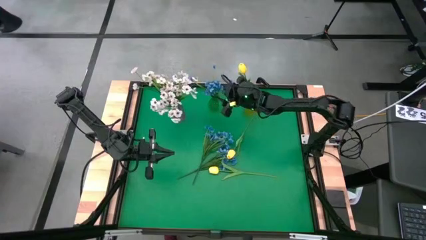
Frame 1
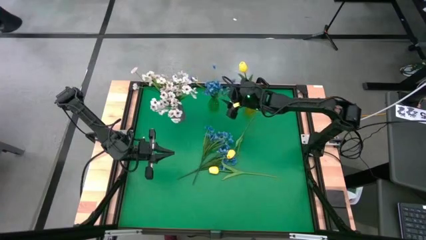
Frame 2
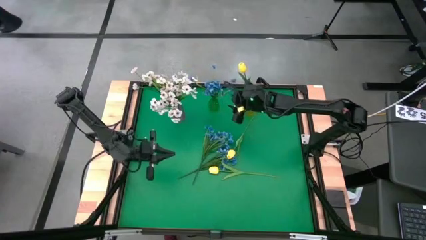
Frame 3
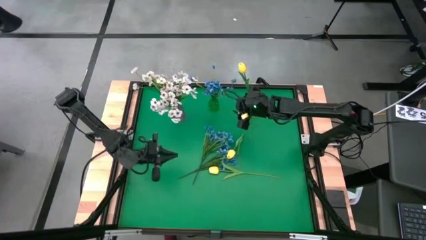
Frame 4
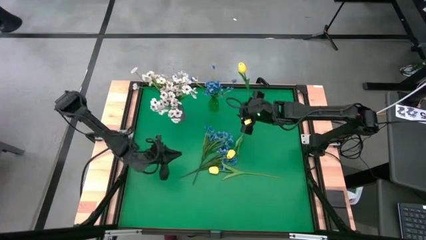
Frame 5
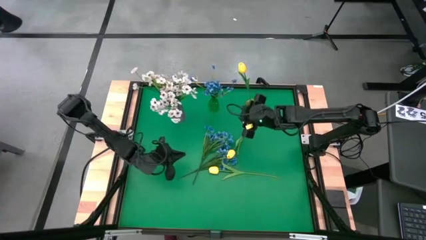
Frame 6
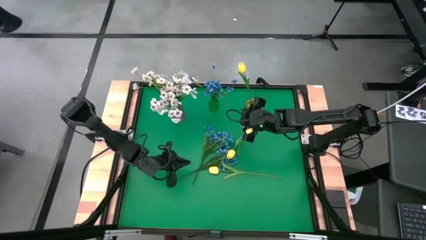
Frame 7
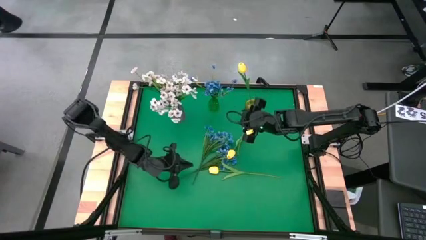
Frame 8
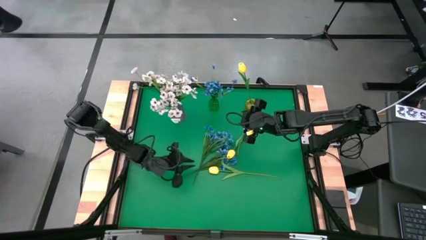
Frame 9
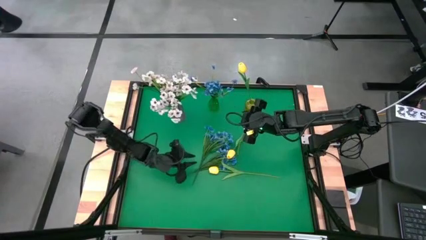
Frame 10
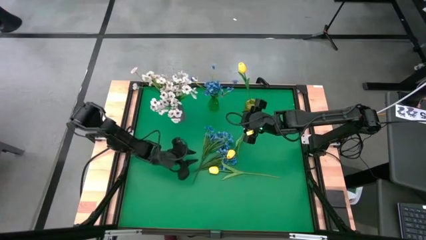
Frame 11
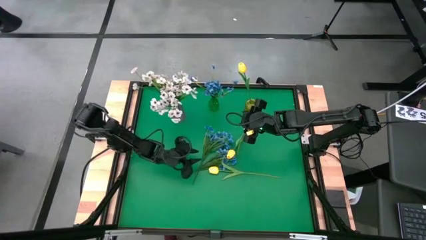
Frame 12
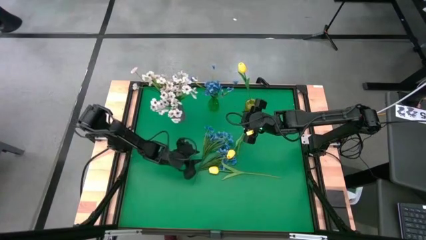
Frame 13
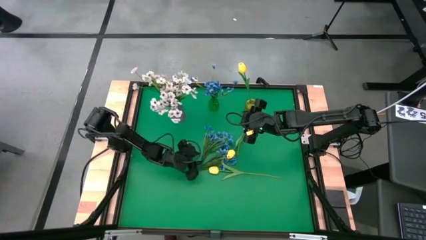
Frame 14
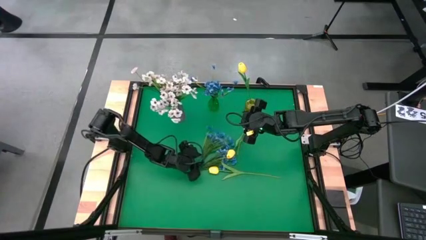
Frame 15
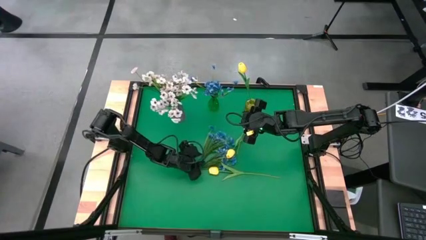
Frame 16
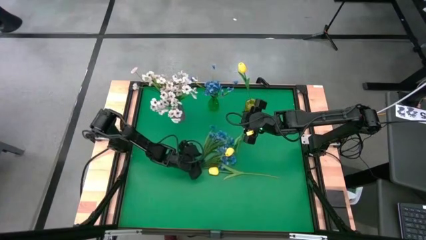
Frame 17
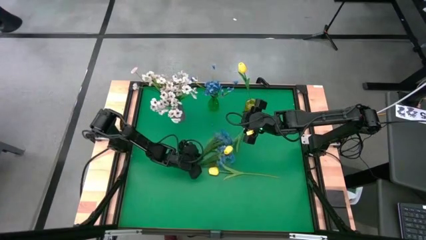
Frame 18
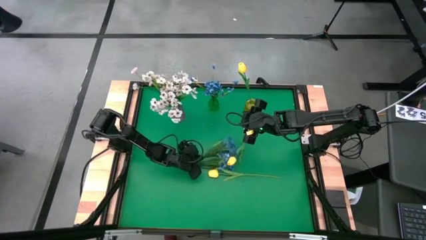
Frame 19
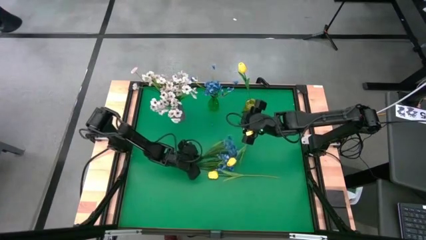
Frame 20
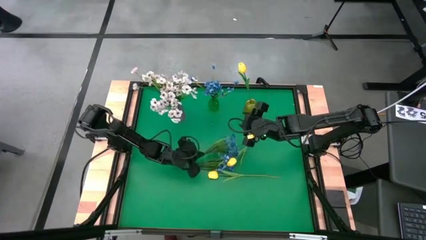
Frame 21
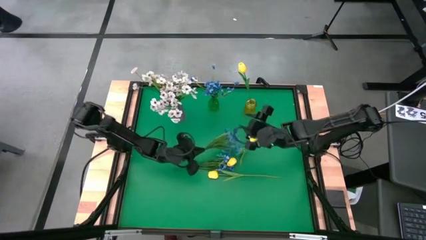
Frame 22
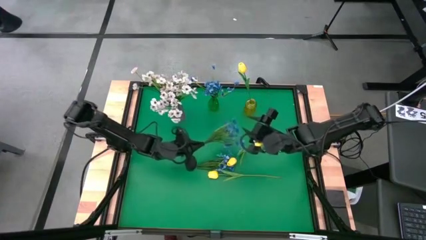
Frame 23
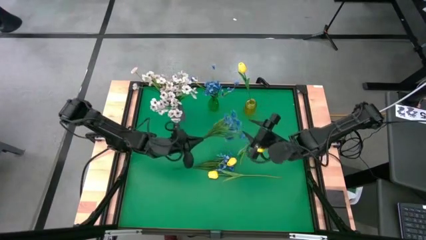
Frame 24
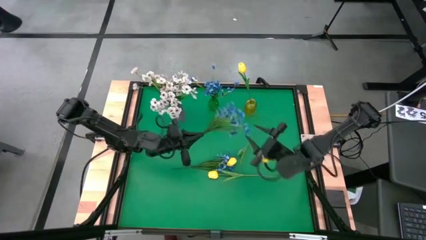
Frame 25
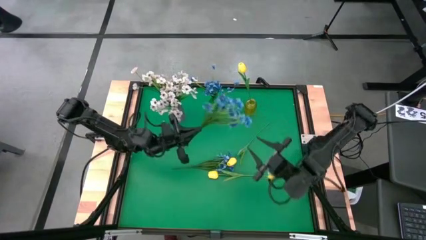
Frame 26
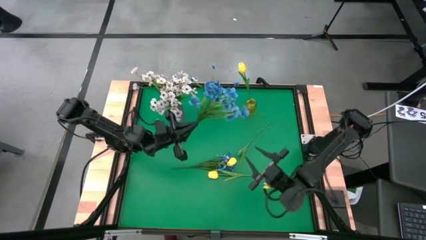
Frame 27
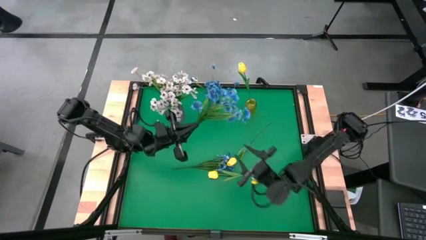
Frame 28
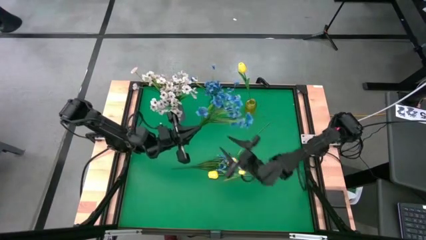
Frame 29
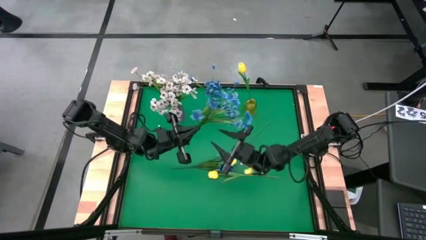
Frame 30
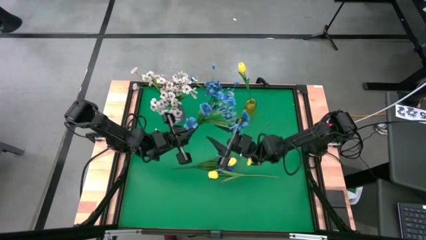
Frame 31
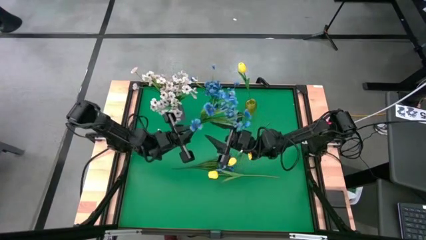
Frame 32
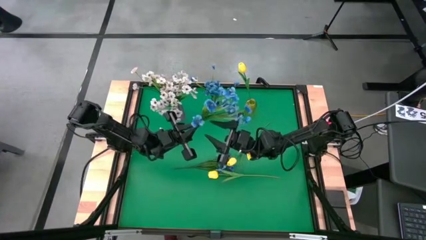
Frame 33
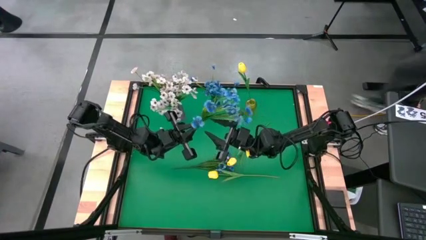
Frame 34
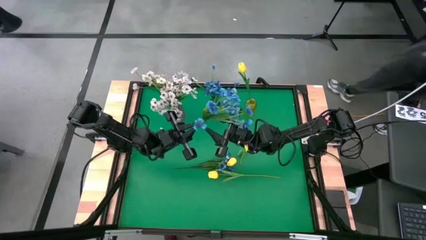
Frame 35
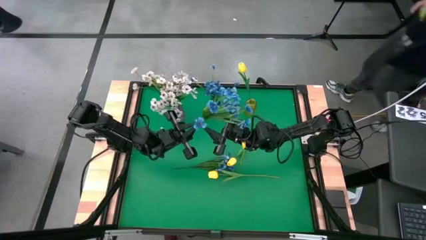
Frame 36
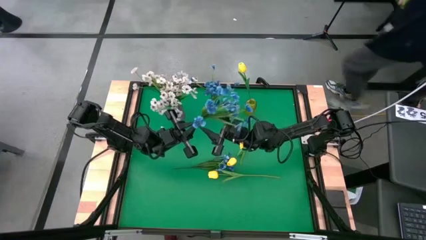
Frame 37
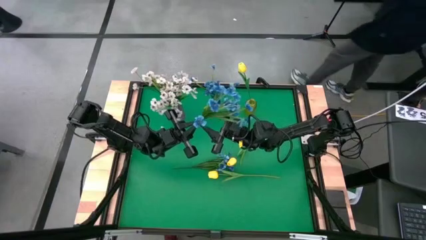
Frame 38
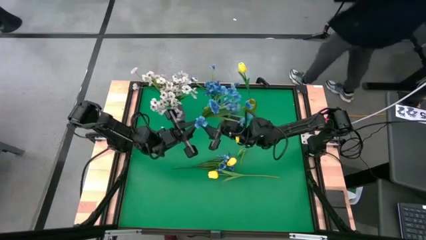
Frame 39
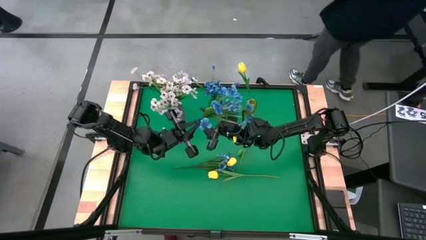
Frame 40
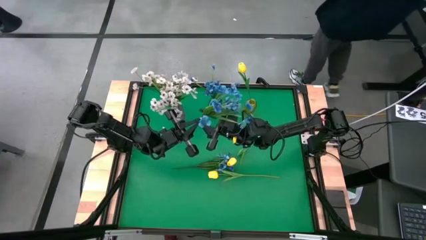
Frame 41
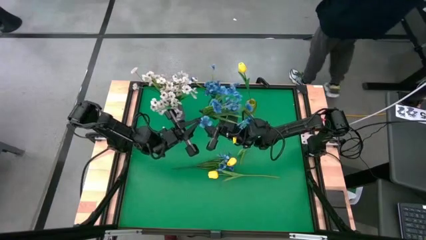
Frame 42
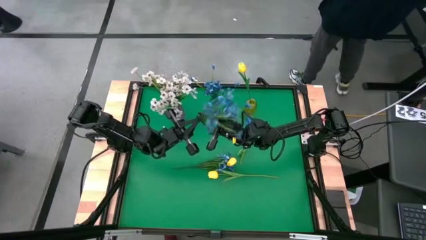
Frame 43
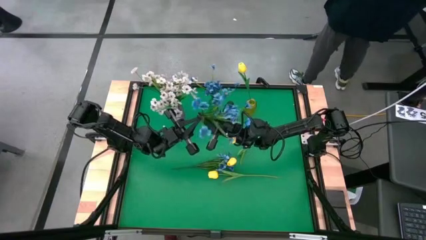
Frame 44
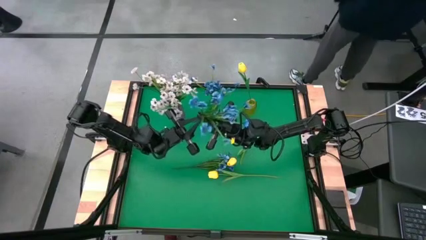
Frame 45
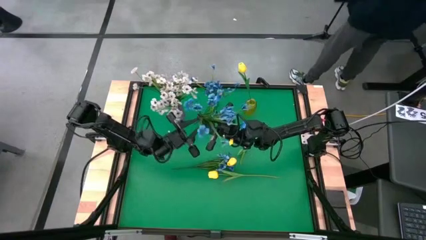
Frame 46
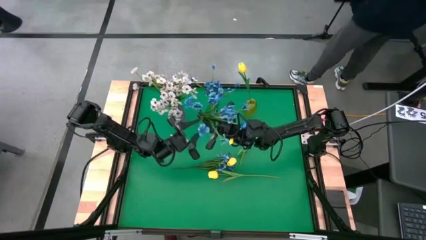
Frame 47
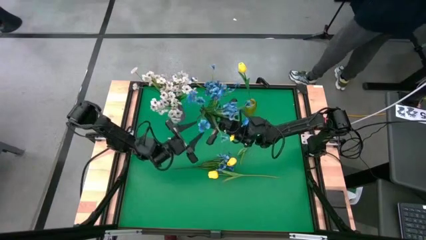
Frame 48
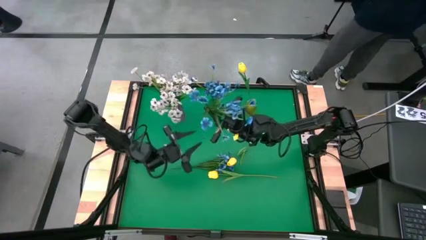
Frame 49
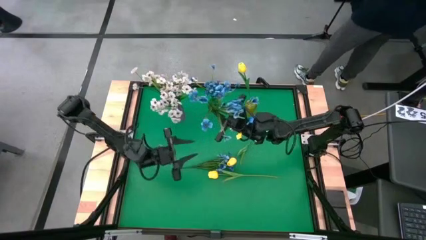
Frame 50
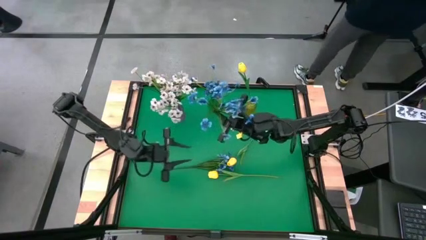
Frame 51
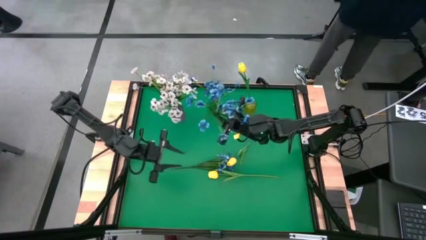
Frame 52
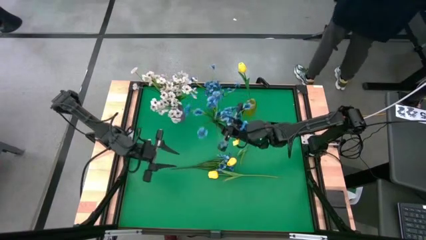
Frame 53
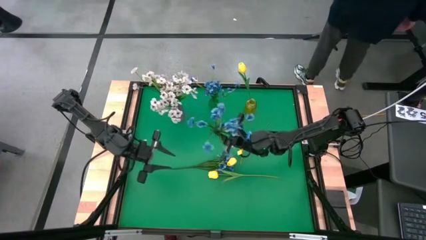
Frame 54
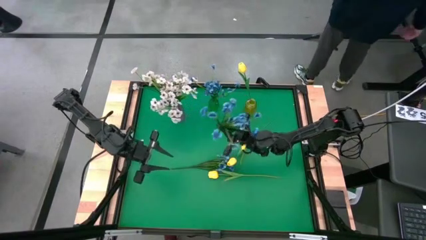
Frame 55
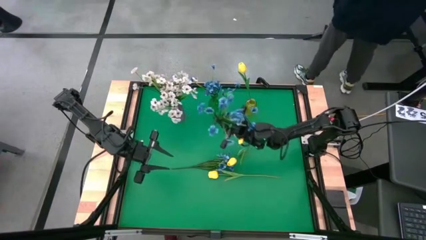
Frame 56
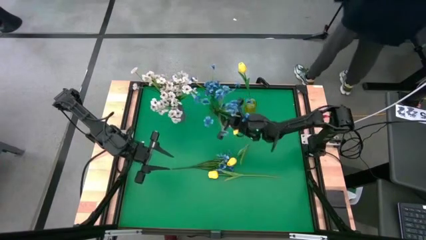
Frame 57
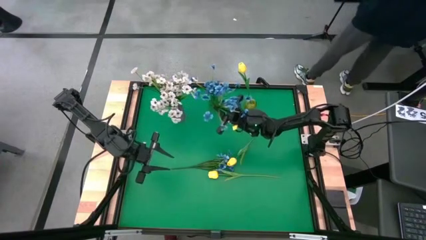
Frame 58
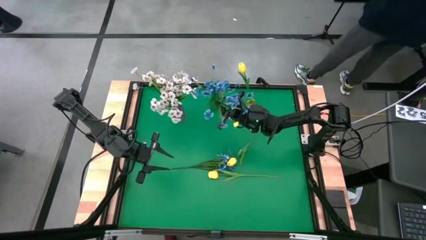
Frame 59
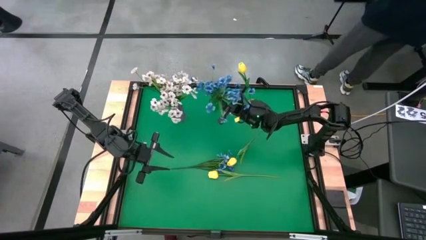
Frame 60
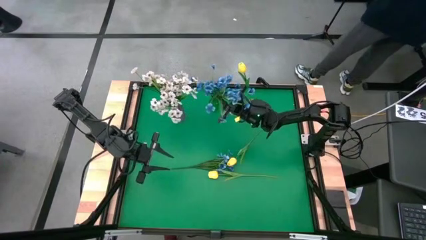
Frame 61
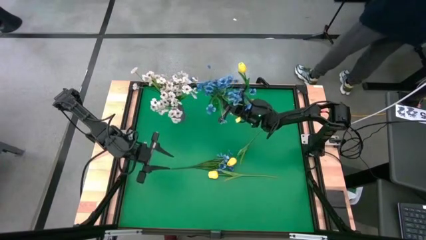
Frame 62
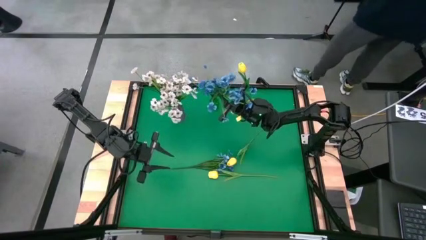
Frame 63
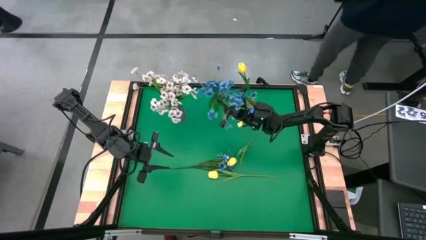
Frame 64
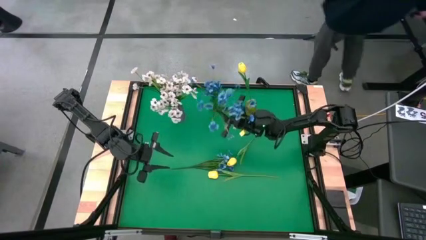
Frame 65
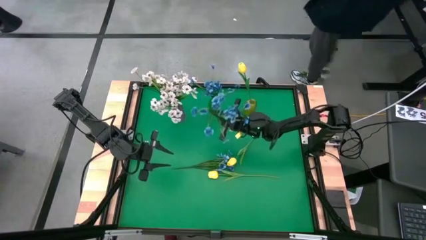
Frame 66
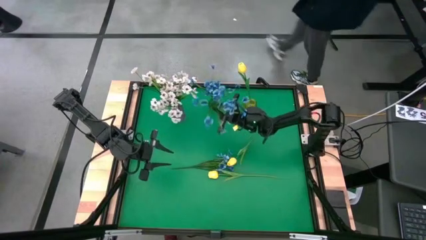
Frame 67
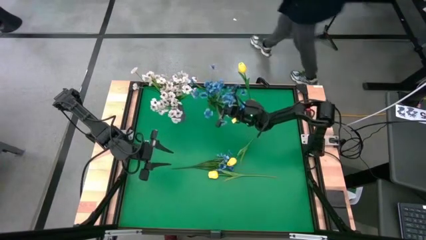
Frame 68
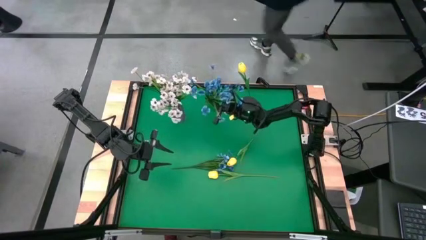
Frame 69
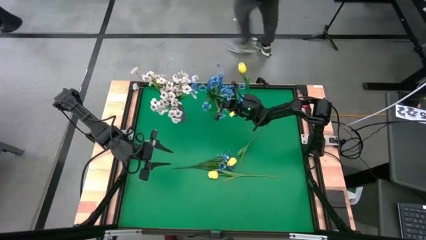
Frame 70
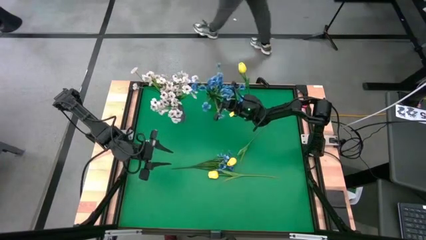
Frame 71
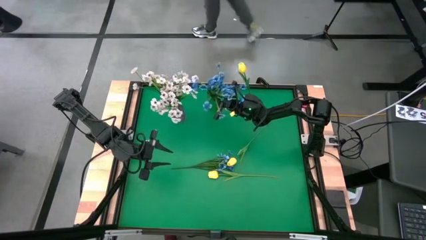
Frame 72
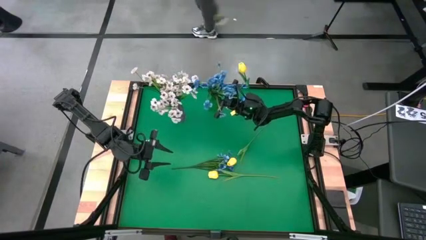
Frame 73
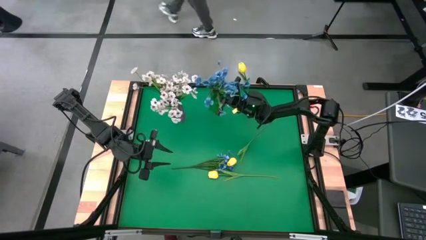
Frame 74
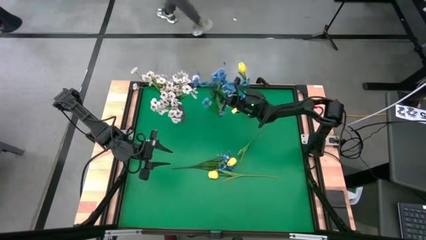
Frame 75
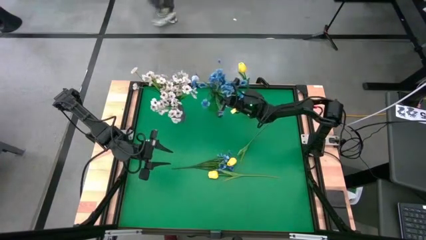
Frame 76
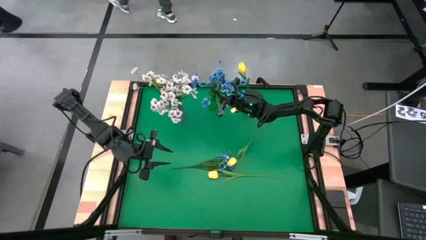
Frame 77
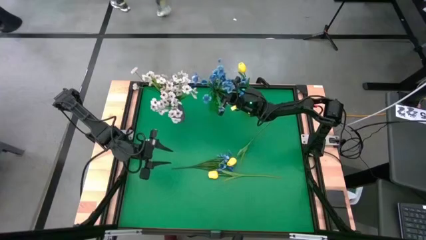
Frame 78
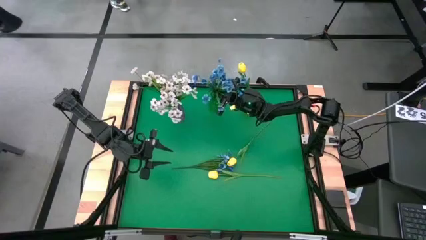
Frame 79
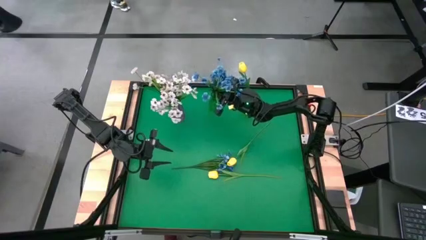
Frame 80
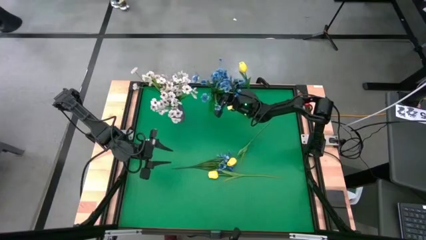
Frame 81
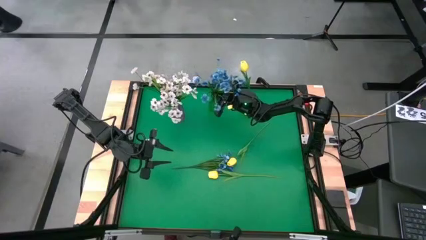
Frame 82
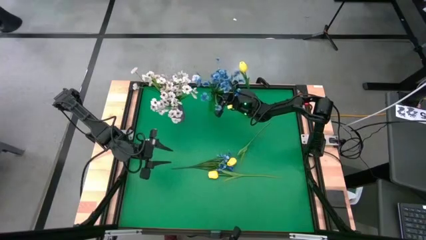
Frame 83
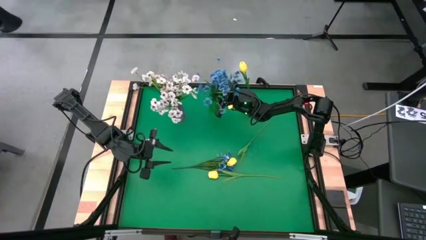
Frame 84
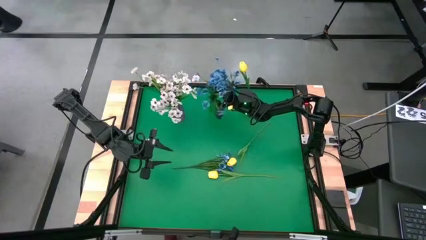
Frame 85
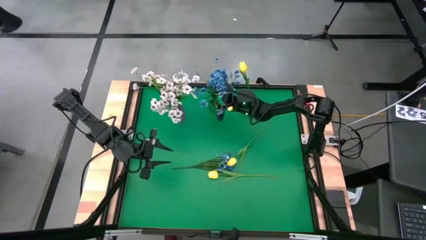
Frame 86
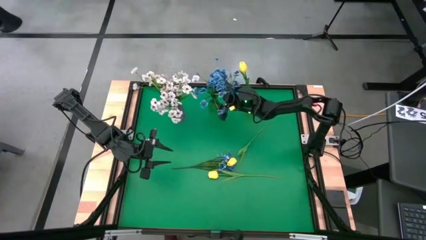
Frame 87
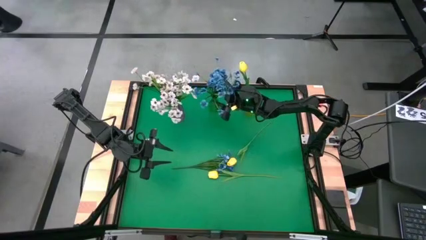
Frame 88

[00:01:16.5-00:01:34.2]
Task: Sort flowers into vase by color
Put the top blue flower into the green vase
